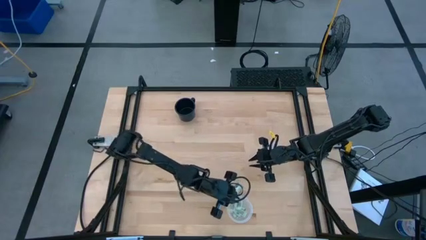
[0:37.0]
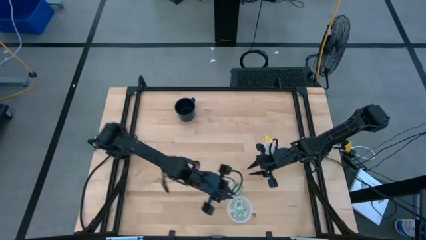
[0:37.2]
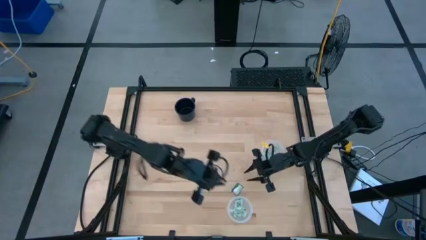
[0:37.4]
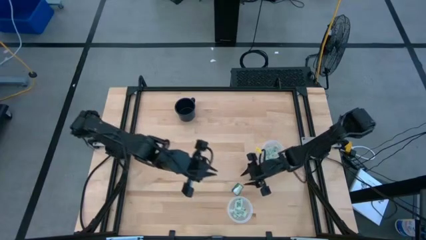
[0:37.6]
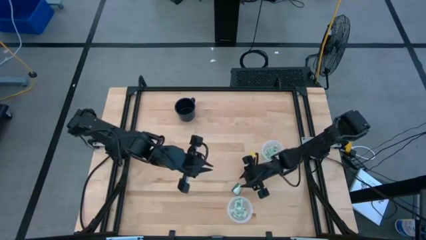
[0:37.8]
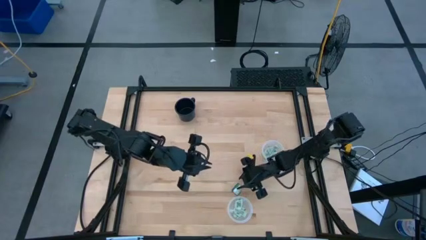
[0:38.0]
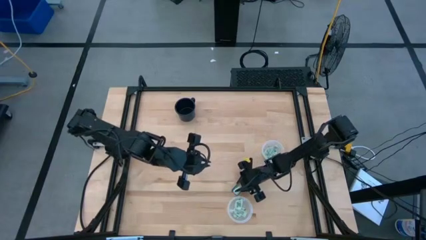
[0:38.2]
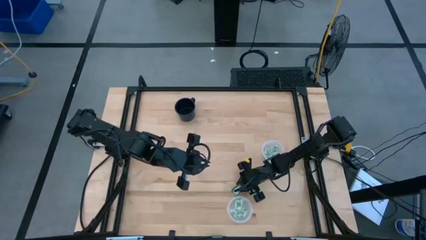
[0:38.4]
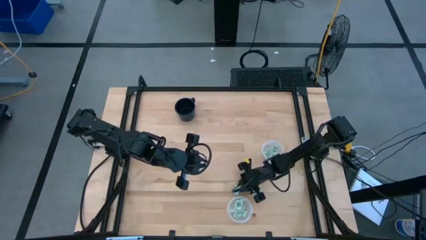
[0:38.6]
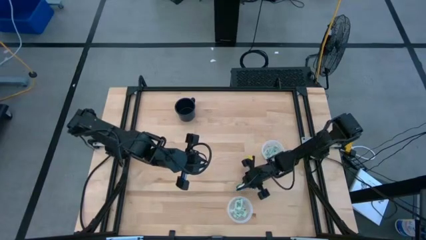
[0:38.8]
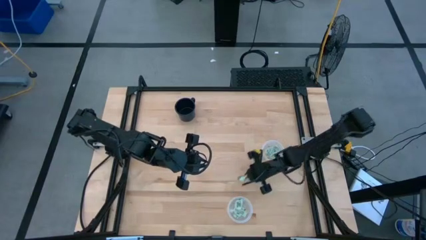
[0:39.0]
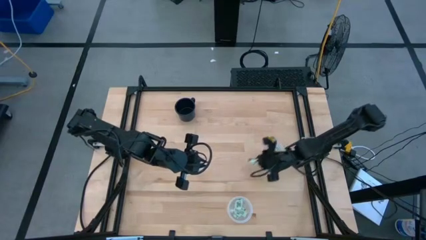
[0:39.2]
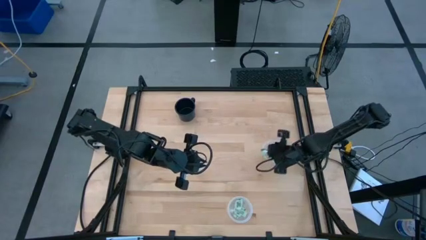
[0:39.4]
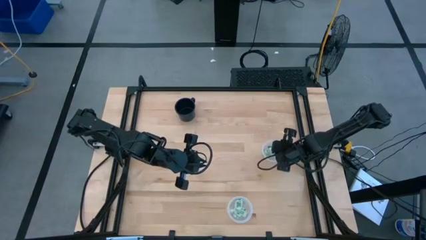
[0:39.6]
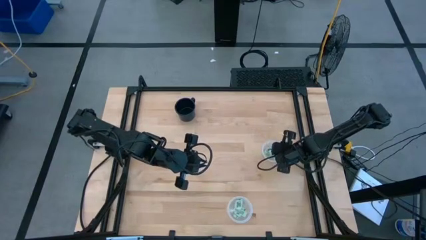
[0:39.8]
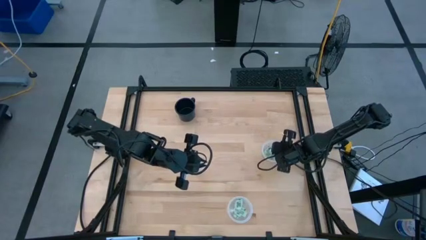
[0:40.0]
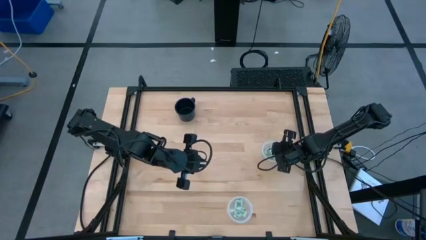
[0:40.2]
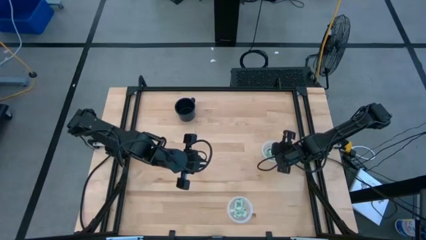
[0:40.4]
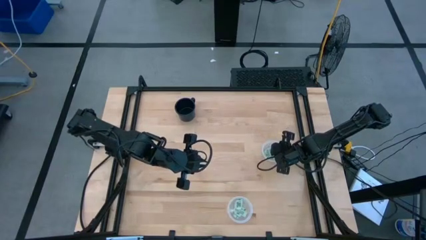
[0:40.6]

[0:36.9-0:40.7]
Task: Pick and place items into bin
Put the green trivia packet into the top bin

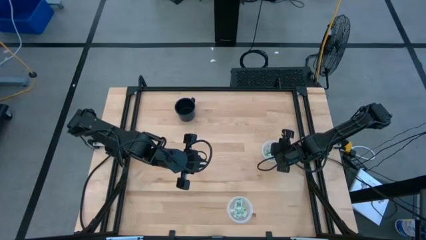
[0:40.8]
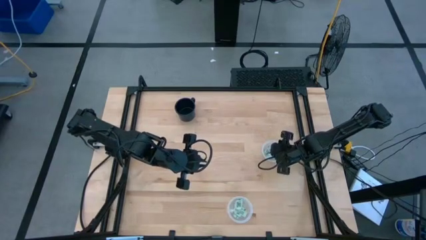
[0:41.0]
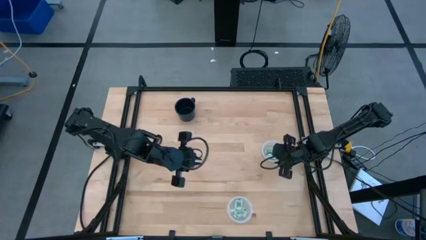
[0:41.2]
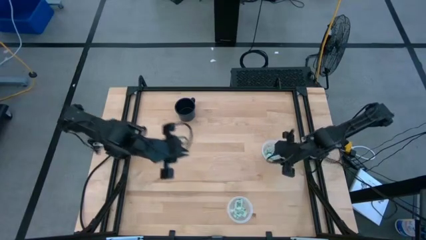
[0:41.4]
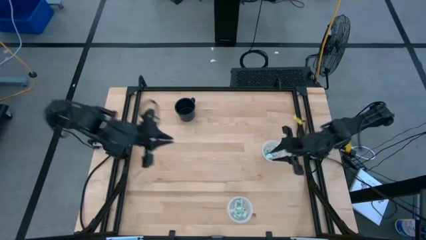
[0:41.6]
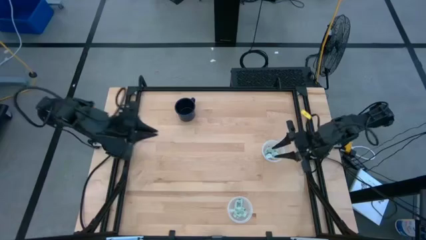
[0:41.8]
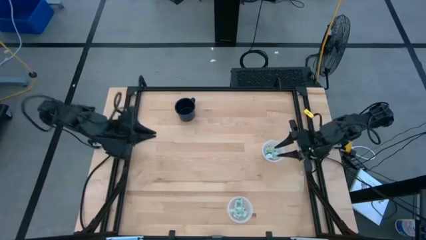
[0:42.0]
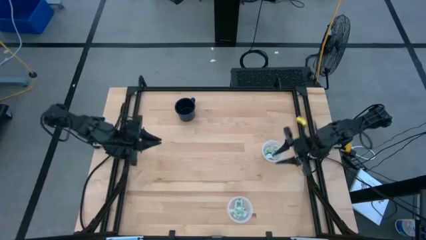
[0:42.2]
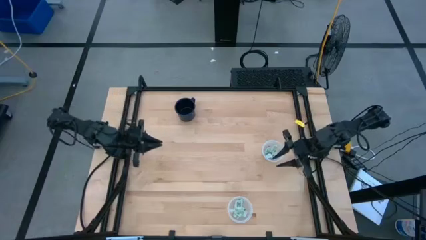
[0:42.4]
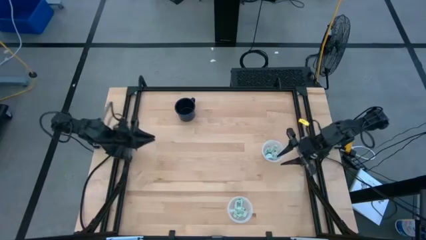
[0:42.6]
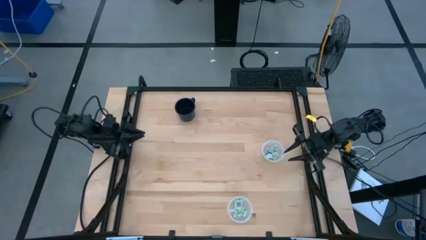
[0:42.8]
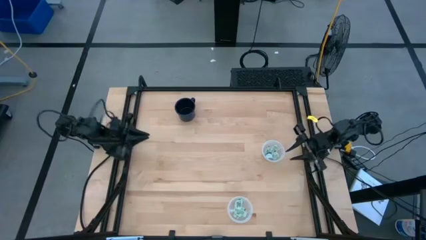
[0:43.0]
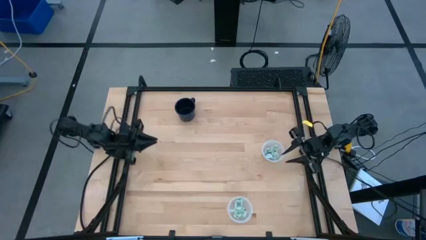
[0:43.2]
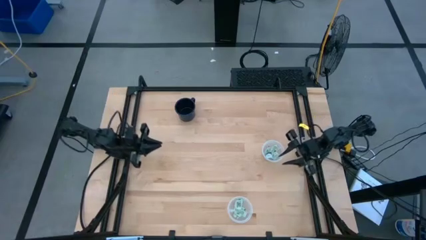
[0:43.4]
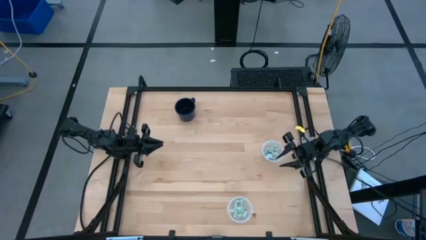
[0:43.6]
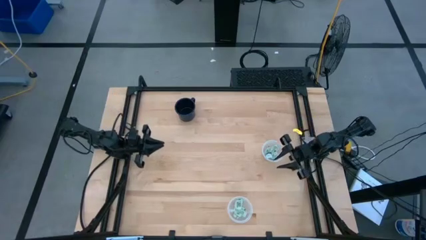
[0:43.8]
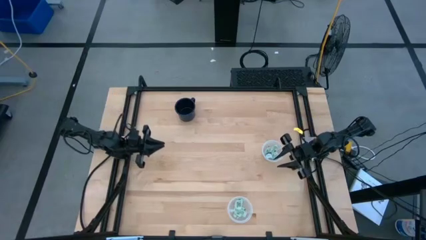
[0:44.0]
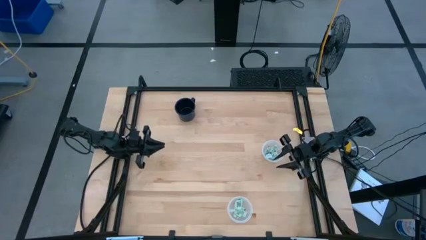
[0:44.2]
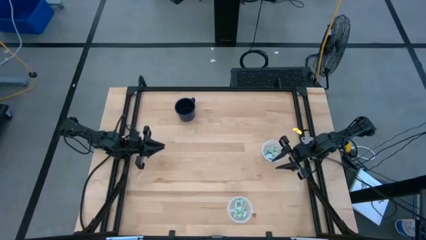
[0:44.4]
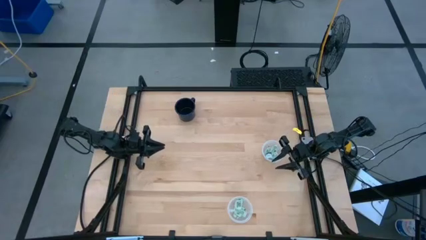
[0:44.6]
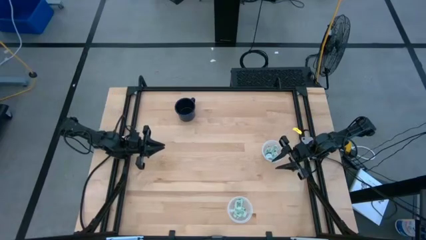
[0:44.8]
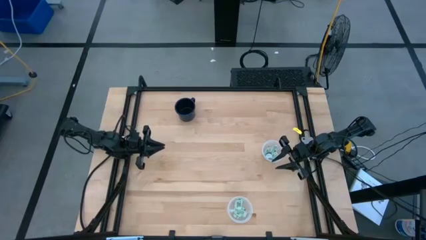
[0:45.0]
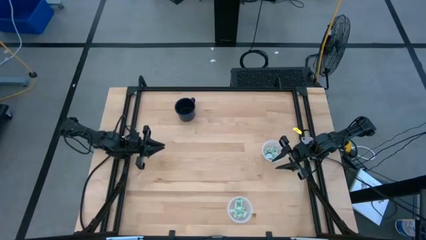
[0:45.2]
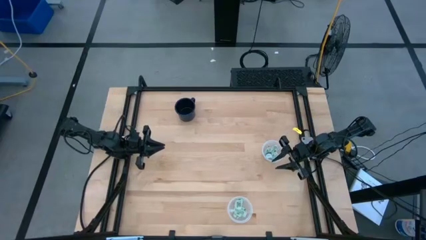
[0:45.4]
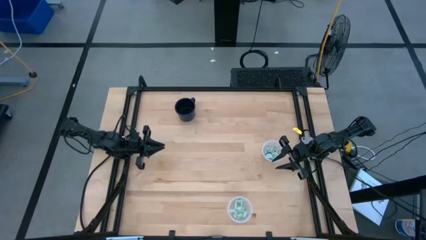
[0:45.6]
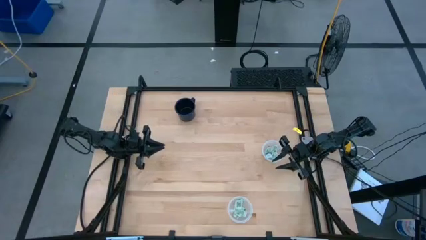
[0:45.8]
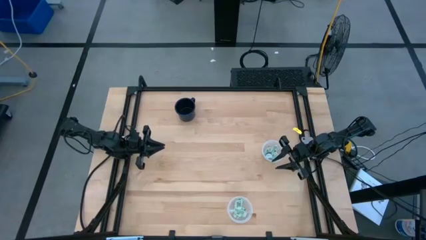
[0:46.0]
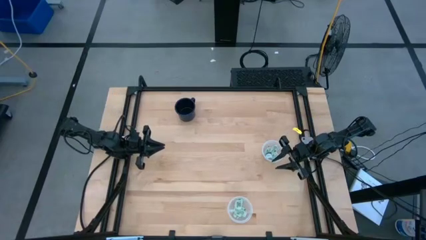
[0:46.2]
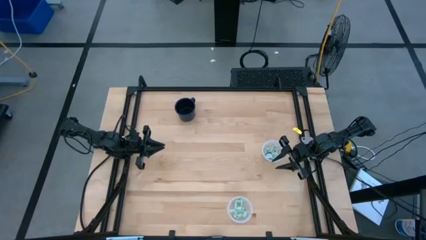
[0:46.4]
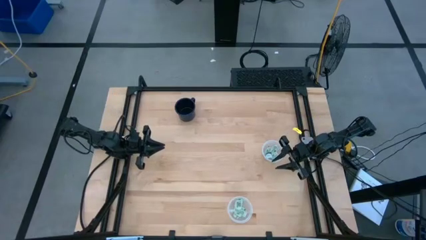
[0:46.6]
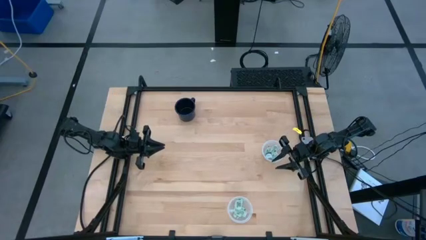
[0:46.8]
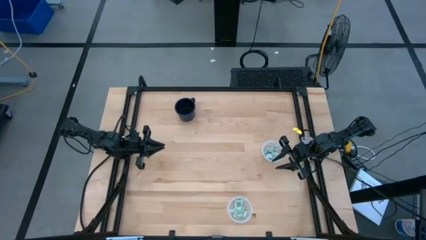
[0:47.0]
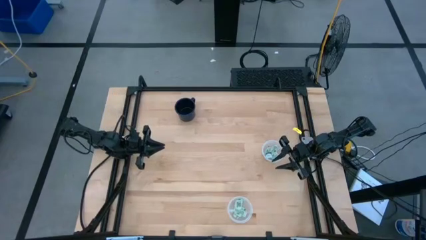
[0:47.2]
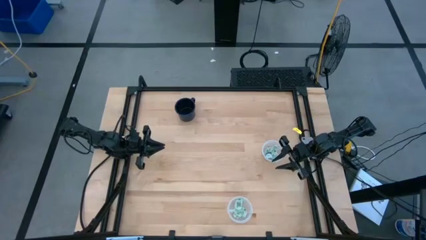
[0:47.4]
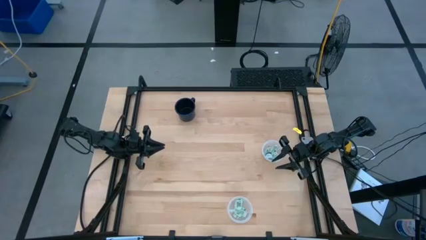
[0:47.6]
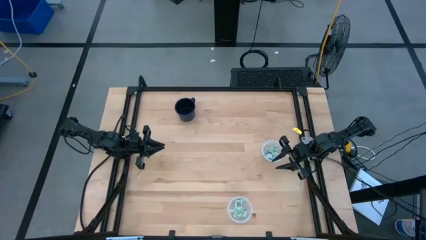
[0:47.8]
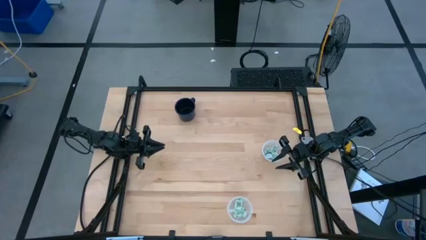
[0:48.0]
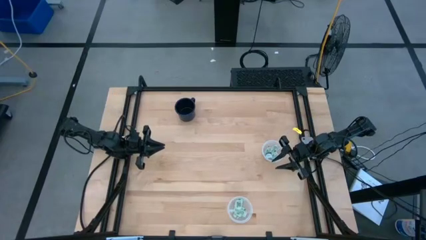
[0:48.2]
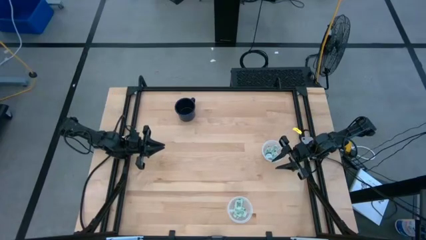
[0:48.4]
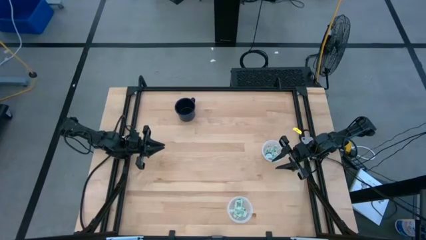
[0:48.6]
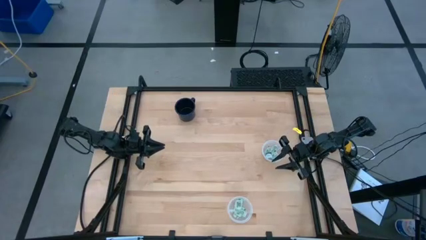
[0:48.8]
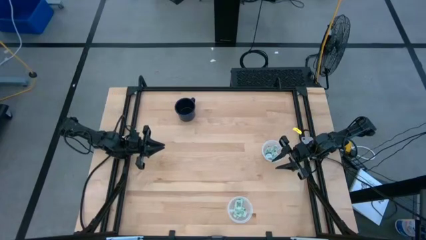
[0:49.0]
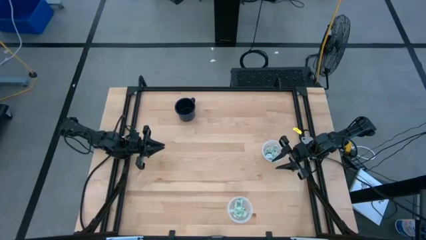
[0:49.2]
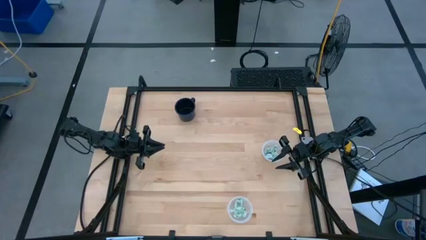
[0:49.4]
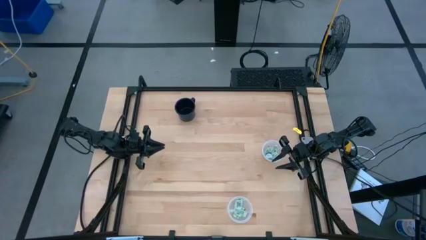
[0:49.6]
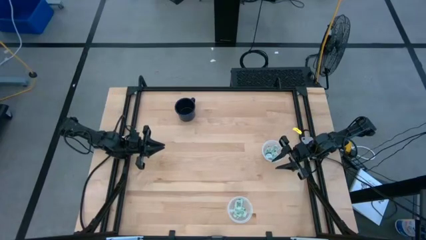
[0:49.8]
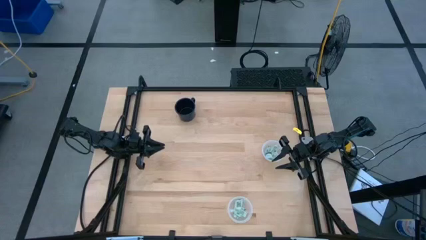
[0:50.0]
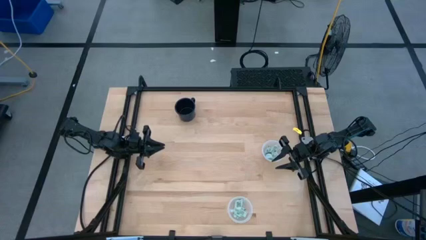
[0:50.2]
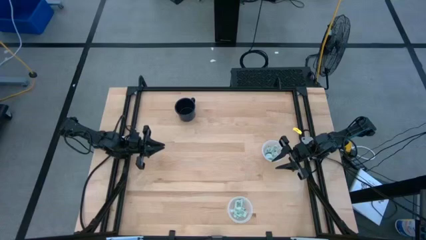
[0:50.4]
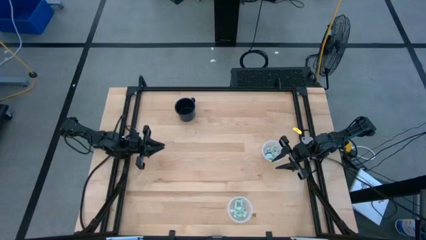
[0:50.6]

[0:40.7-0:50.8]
Return to Home Position

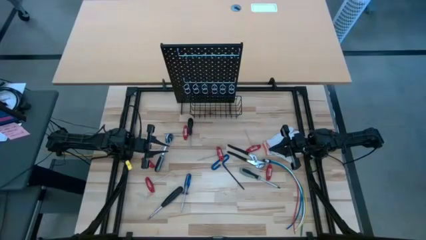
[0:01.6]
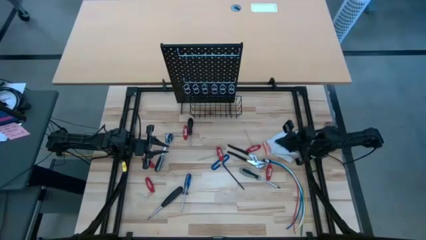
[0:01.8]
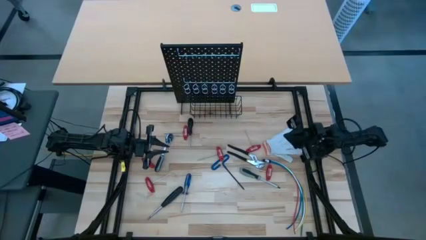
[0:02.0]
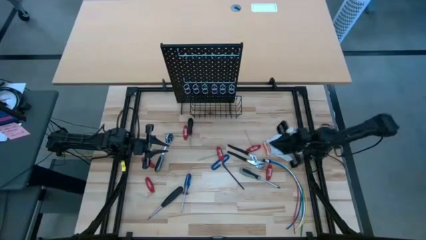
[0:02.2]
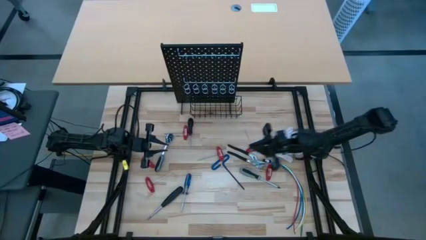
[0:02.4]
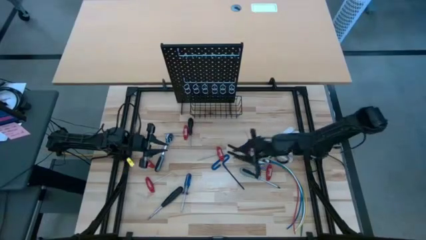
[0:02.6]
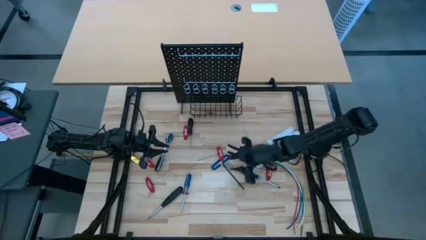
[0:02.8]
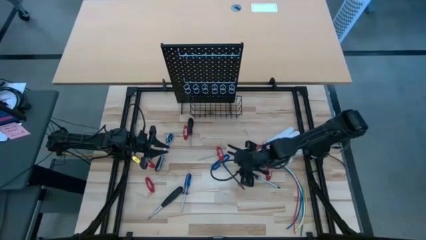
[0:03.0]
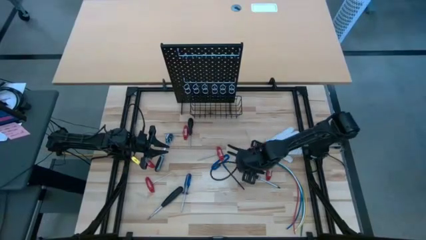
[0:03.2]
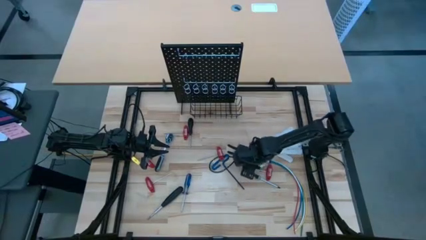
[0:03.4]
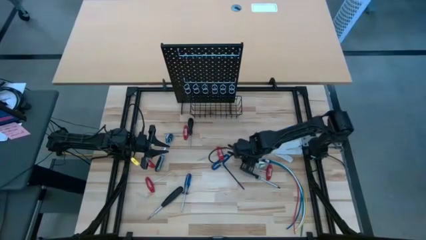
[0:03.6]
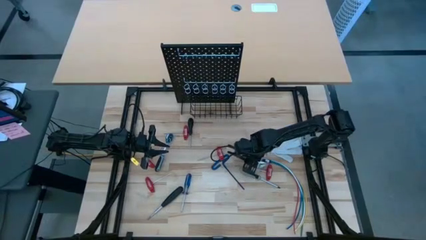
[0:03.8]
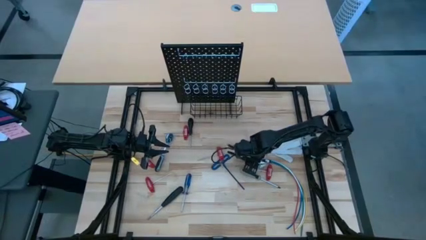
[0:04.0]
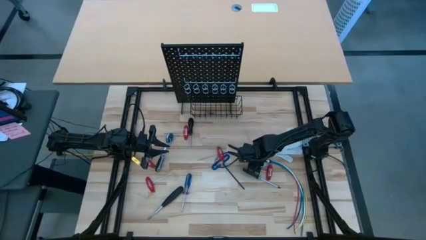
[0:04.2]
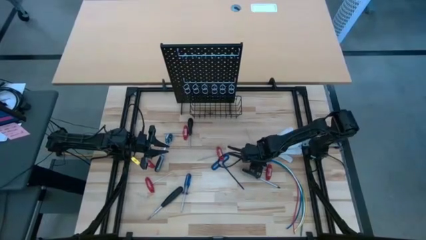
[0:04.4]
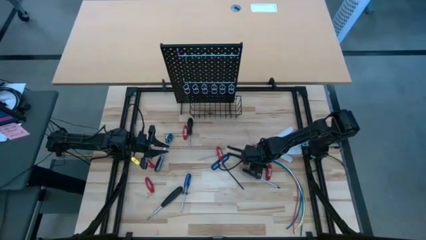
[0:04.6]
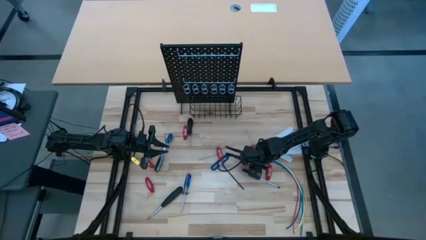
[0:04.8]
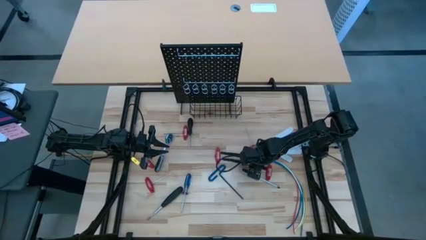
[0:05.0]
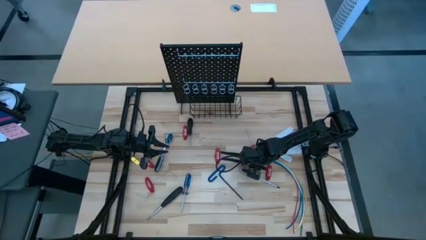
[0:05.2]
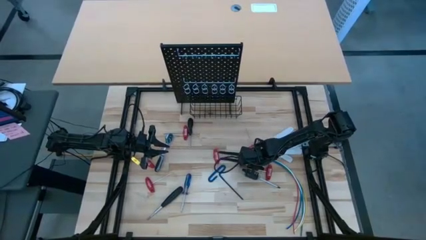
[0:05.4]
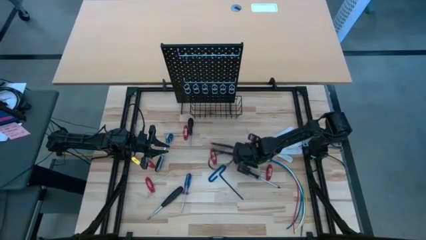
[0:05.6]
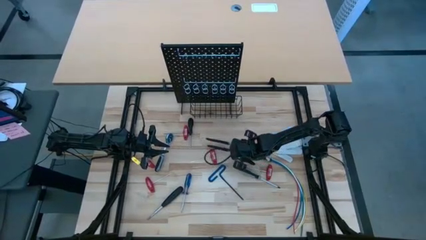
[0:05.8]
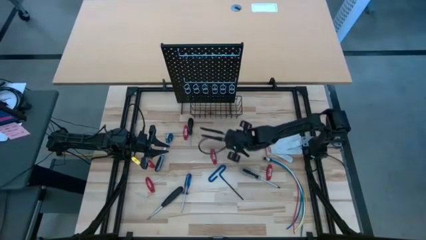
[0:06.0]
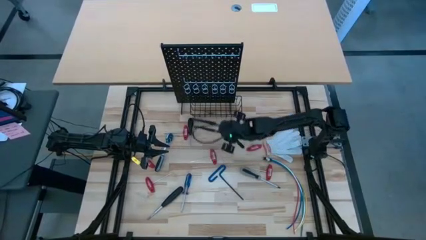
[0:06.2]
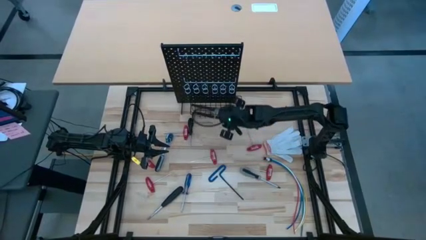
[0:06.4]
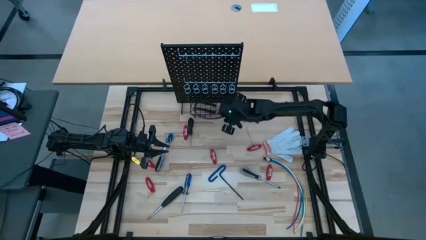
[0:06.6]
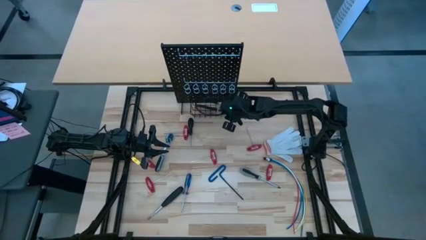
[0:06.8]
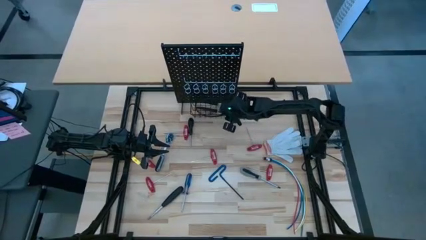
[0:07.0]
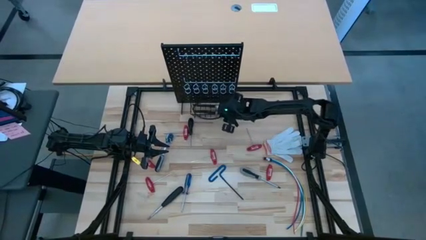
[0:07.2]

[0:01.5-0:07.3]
Task: Hang tools onto peg board
Put the slip-joint pliers into the black basket on the pegboard
